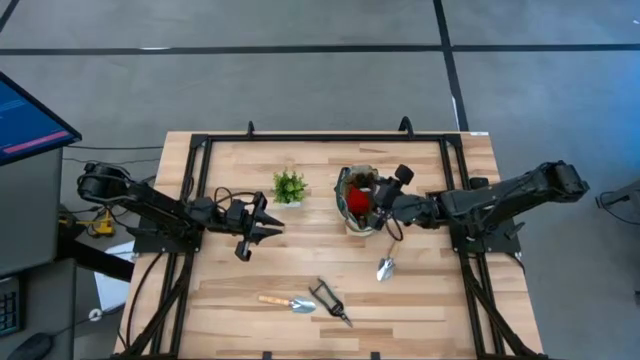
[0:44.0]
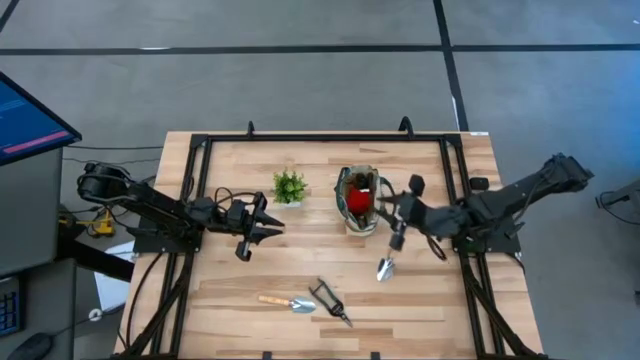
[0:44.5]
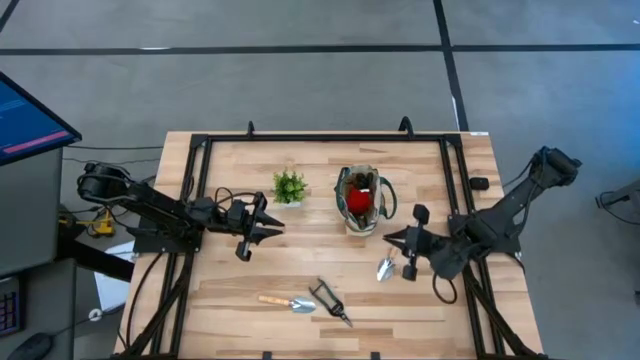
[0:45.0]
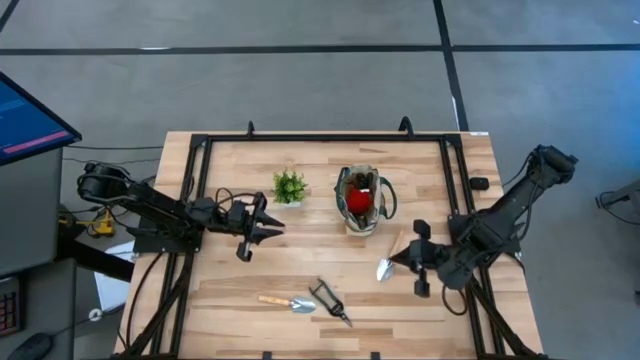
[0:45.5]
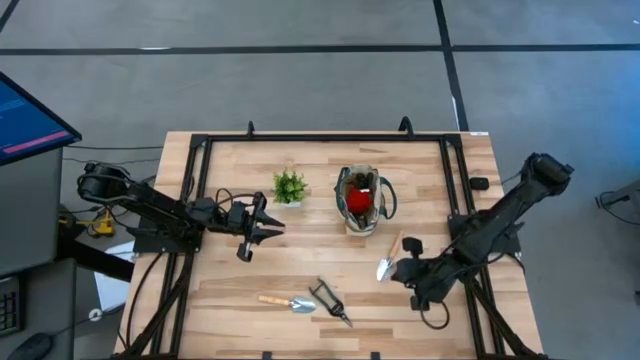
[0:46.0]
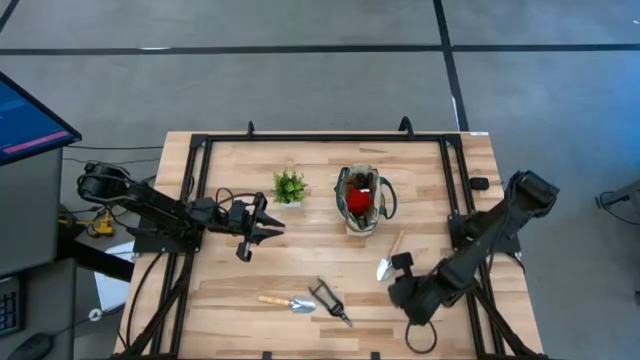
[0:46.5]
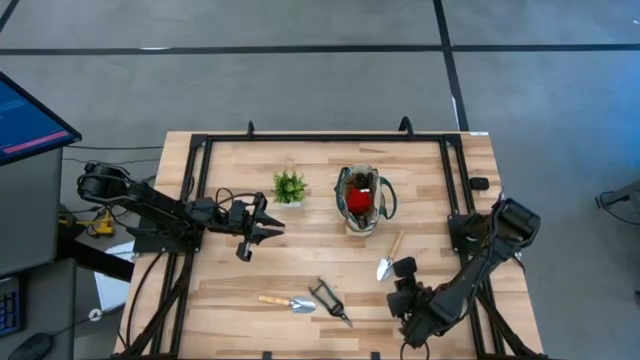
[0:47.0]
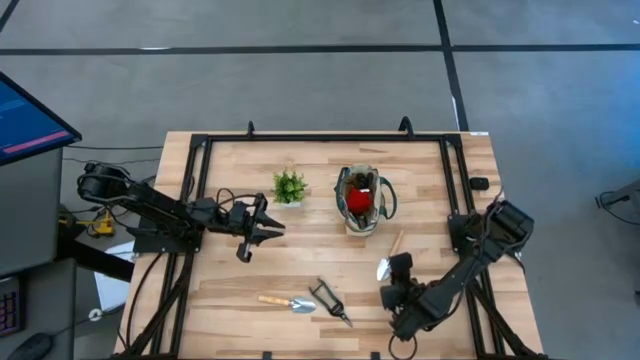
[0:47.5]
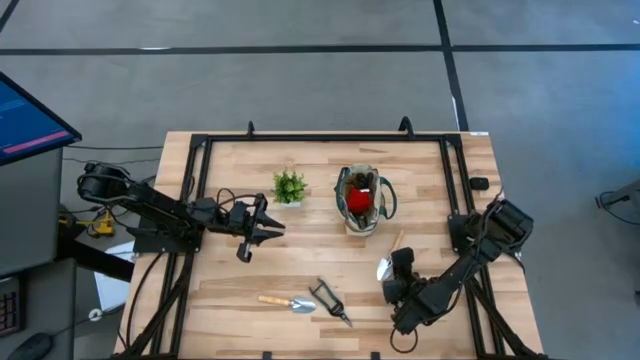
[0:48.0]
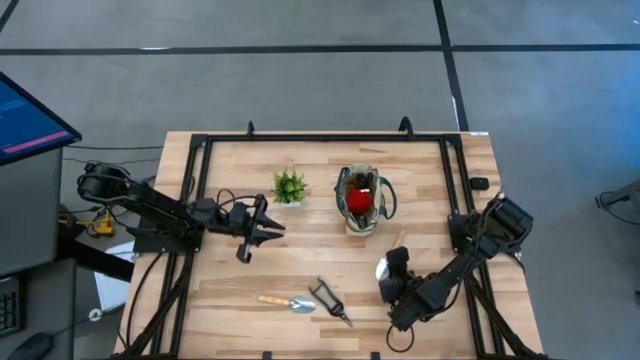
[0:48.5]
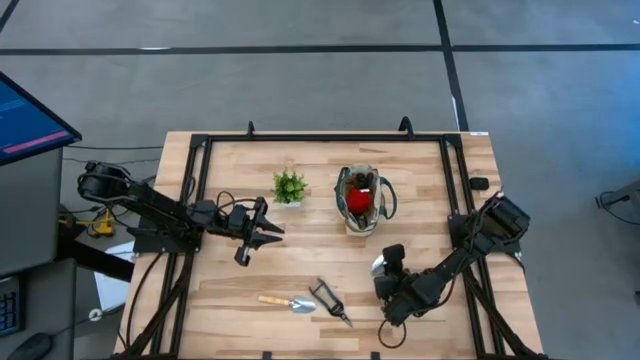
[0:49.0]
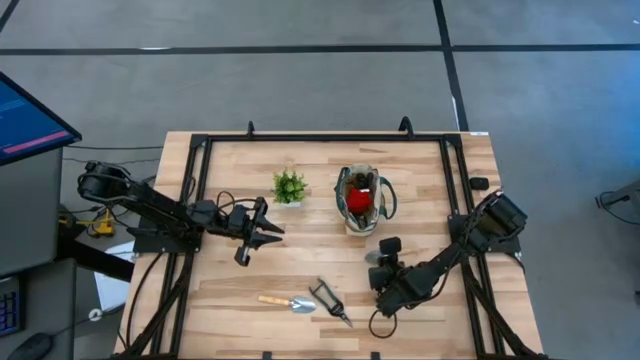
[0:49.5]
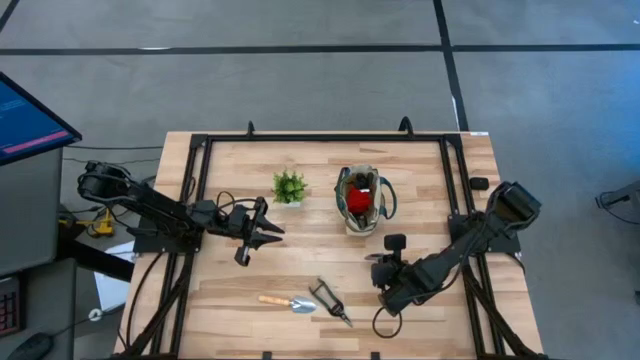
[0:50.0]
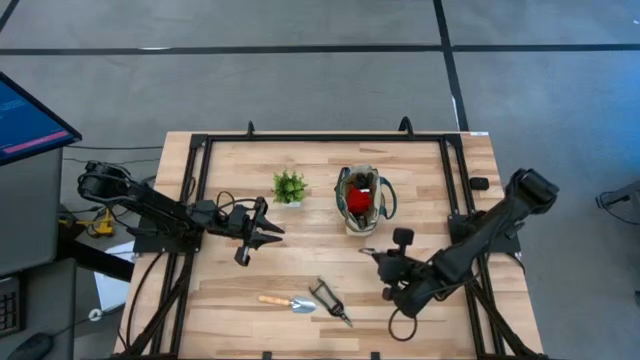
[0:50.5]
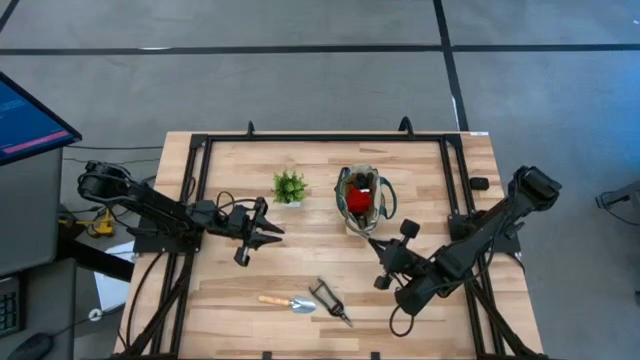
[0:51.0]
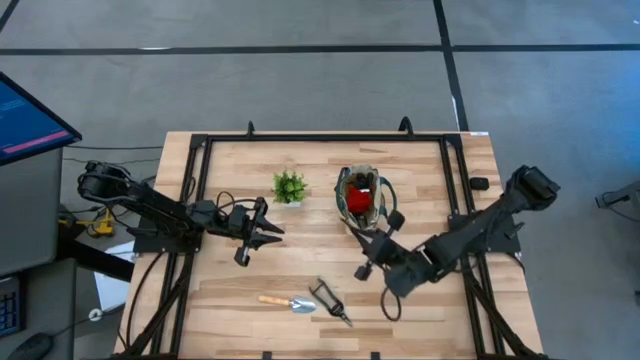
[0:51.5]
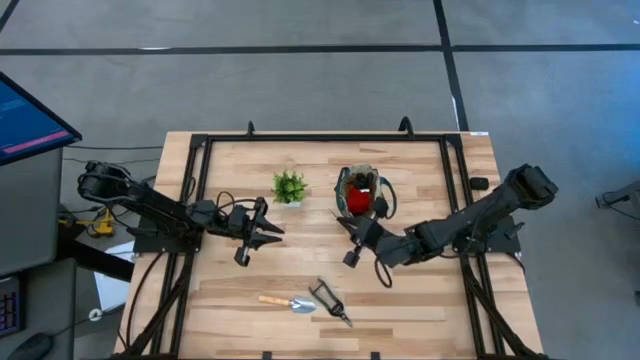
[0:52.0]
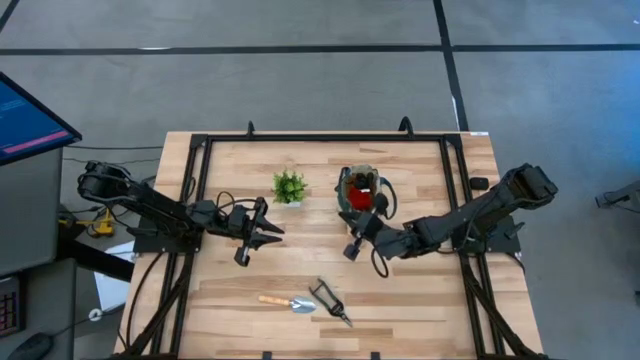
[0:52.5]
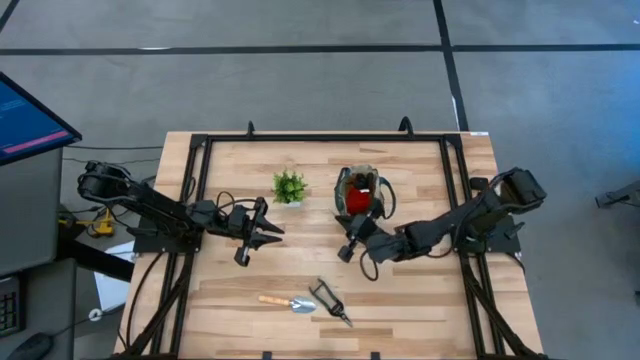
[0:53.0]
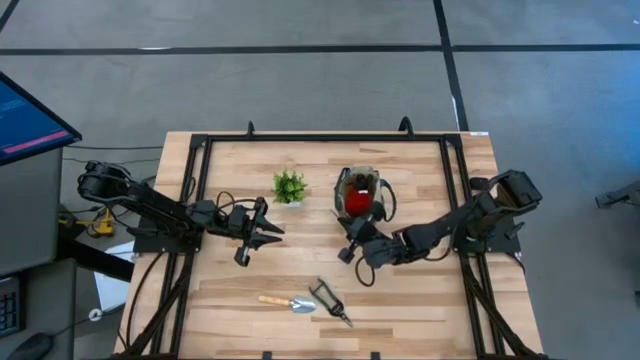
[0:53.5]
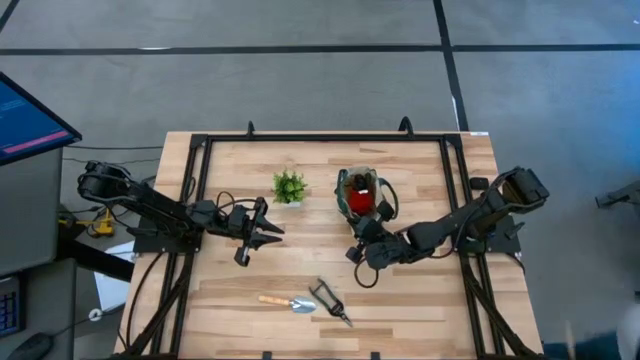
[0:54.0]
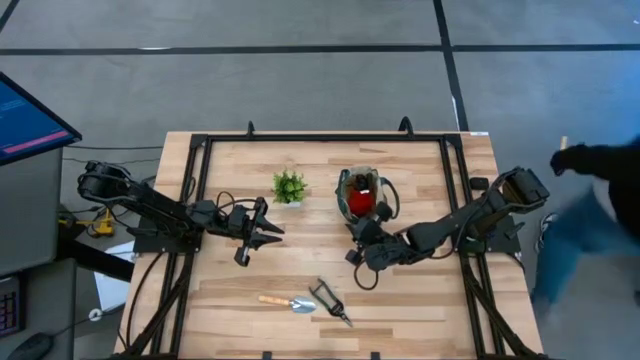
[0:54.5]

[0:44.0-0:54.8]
Task: Pick & Place Garden tools in Gardening bag
Put the top brown trowel into the white gardening bag

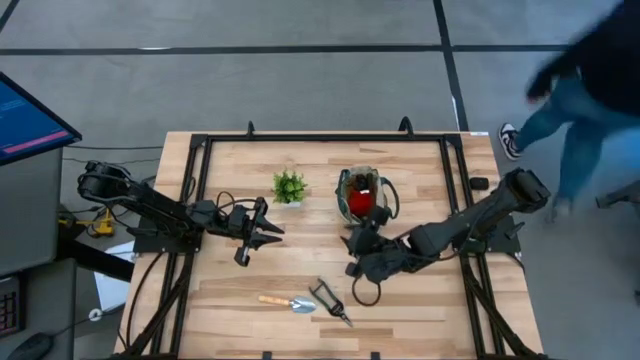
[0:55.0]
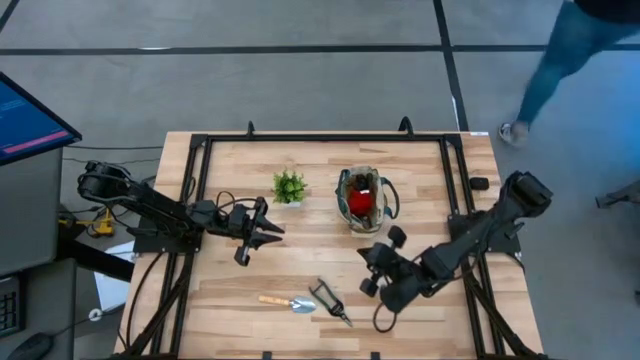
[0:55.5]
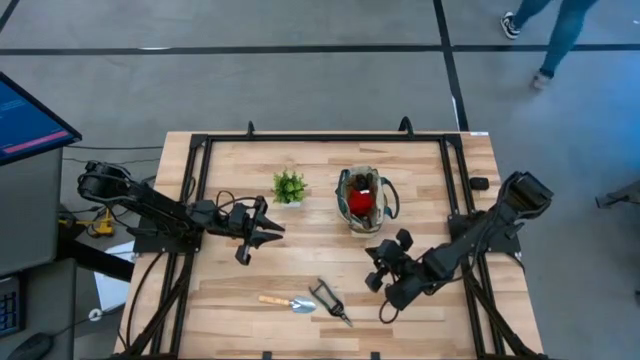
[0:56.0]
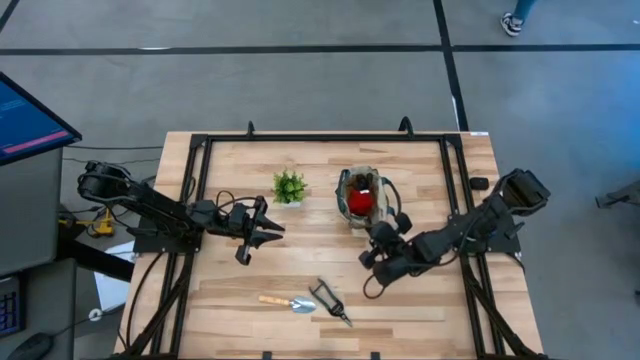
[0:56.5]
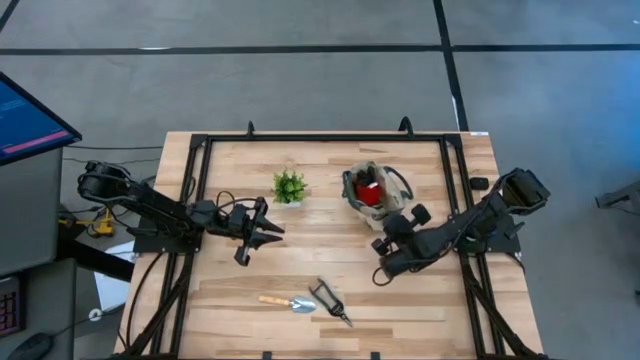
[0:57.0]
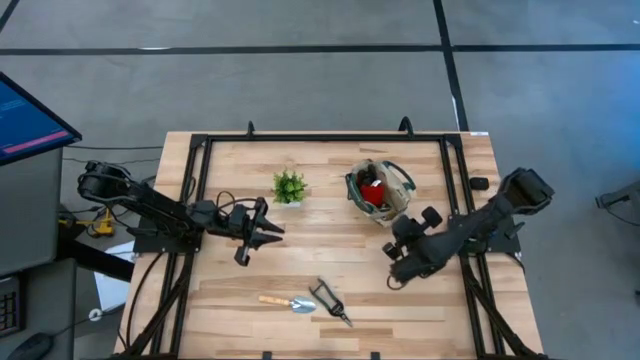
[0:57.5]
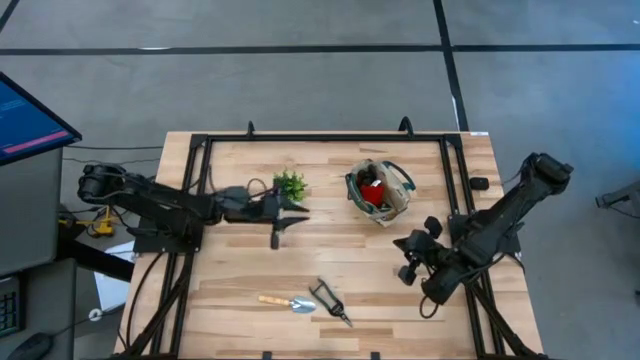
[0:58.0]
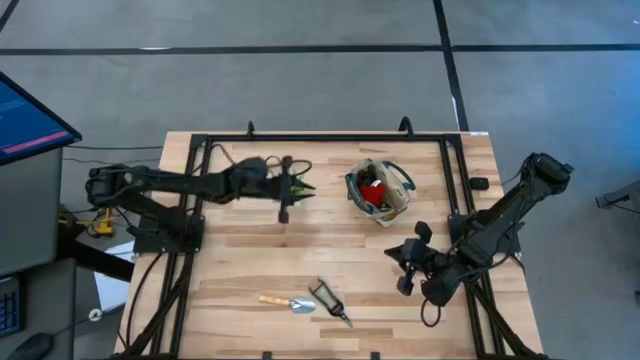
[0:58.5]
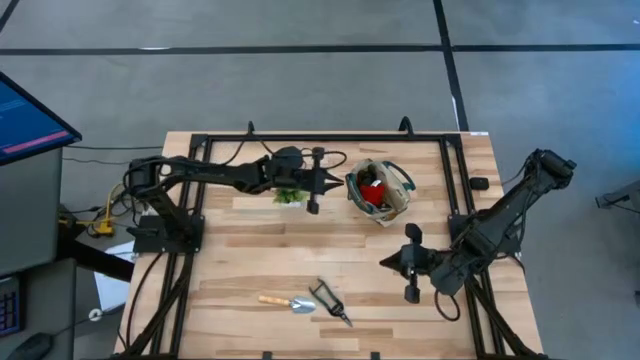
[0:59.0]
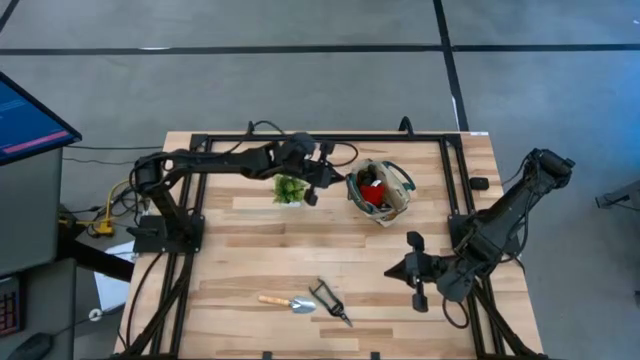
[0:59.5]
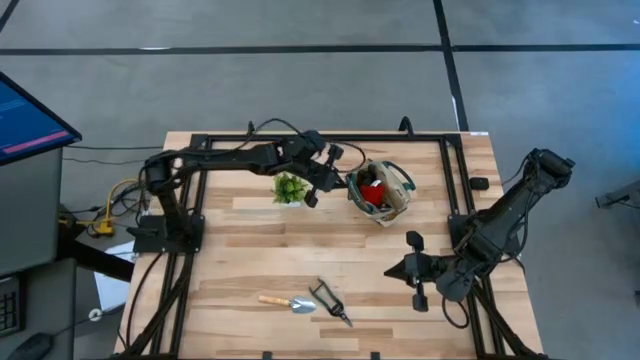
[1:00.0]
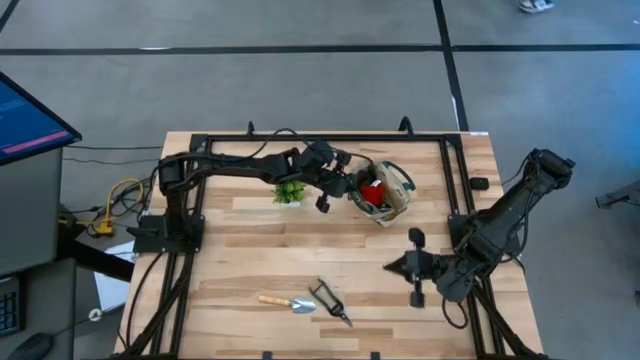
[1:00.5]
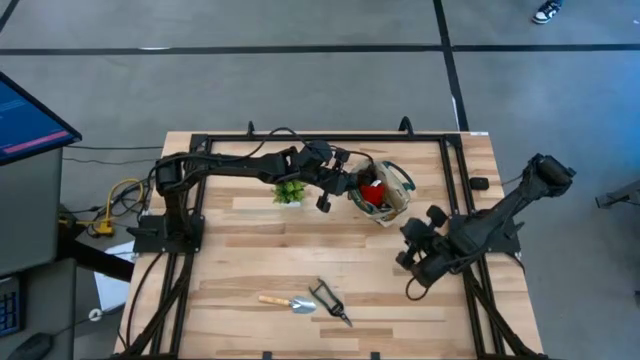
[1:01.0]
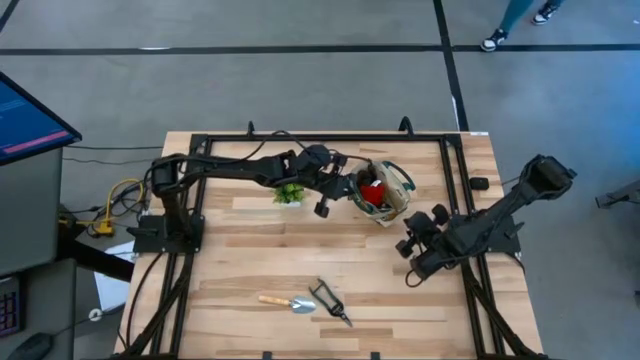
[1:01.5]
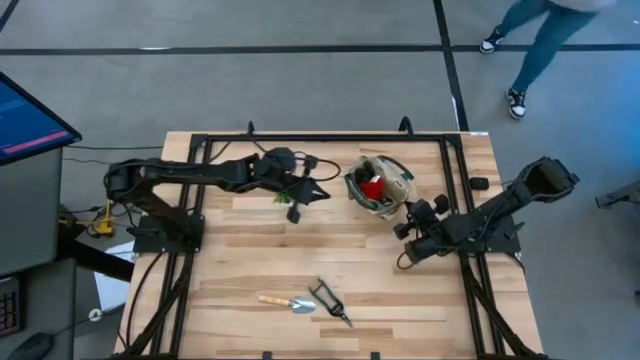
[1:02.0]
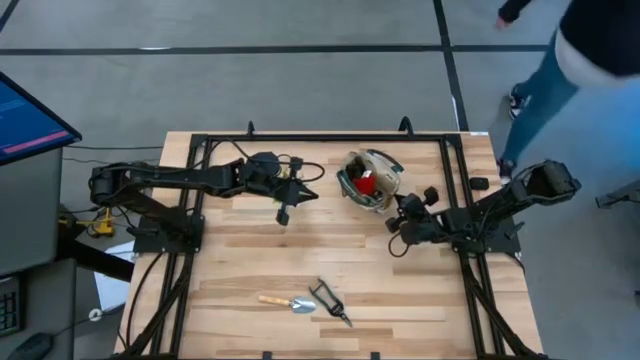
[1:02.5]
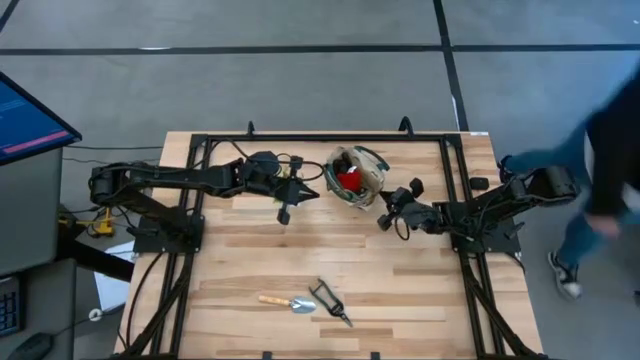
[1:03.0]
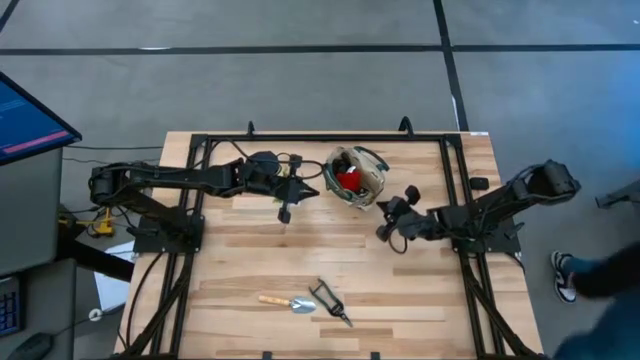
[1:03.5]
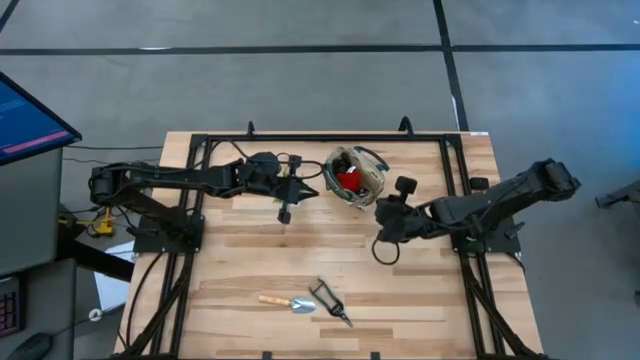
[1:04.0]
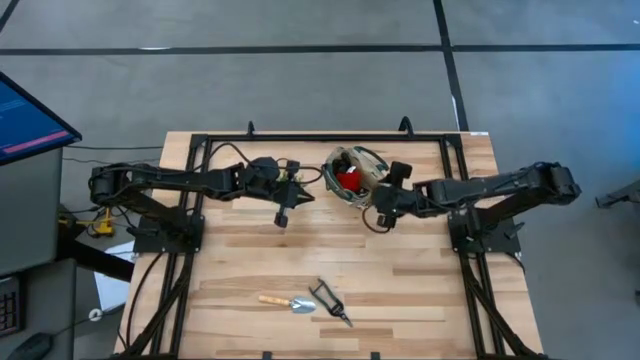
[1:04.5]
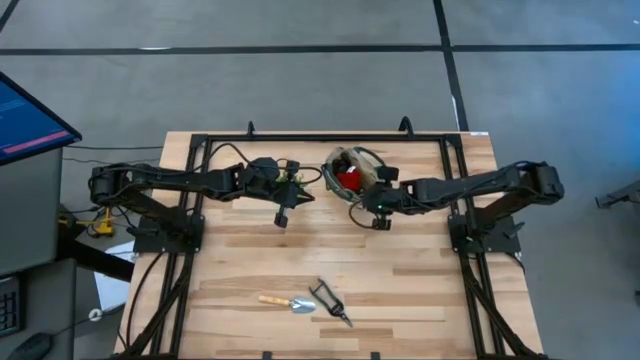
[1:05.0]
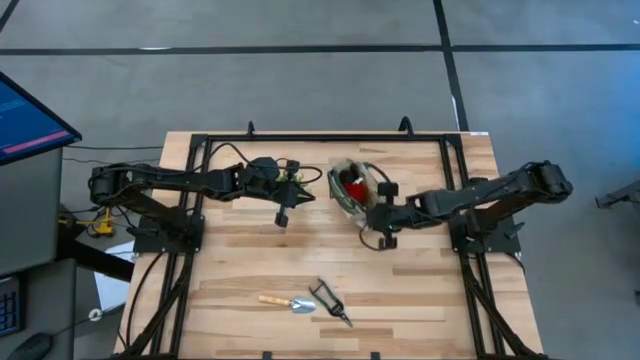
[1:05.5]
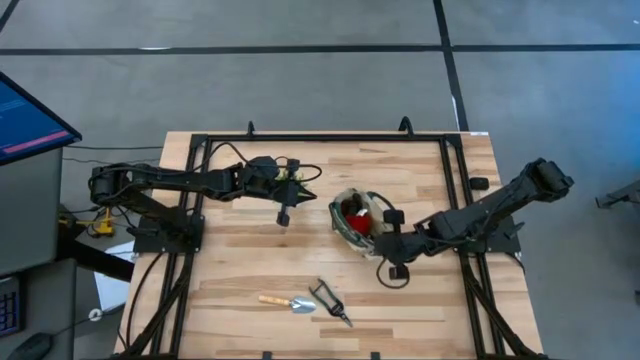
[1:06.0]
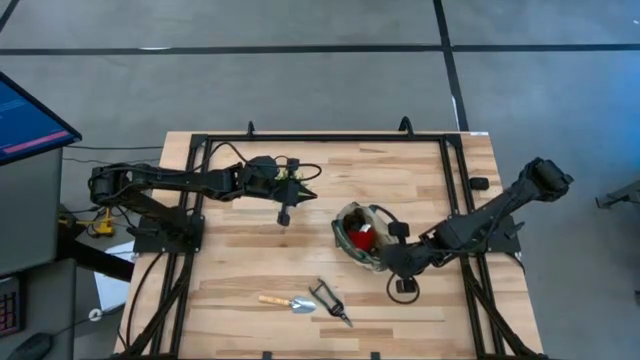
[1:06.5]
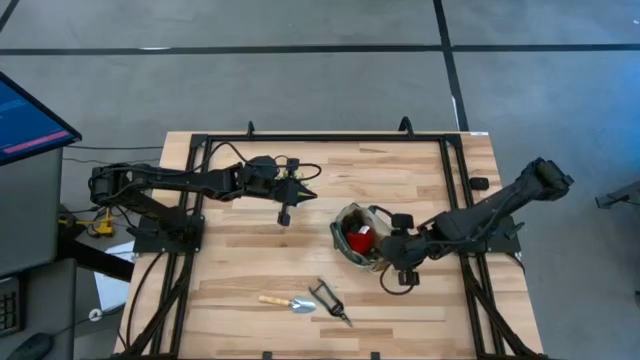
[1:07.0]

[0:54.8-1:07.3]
Move the white gardening bag to the center of the table
